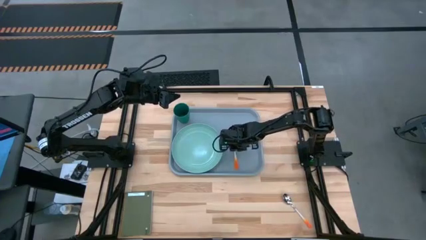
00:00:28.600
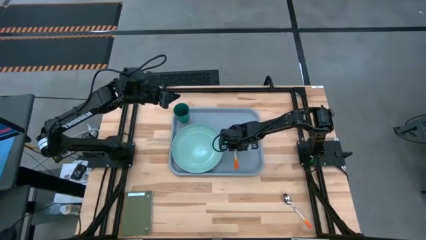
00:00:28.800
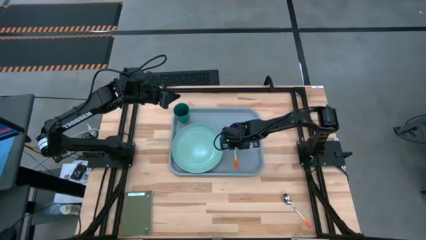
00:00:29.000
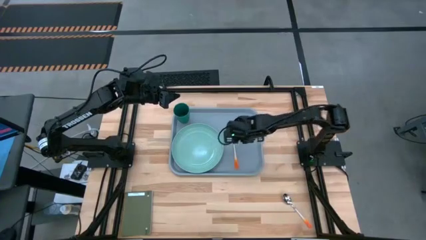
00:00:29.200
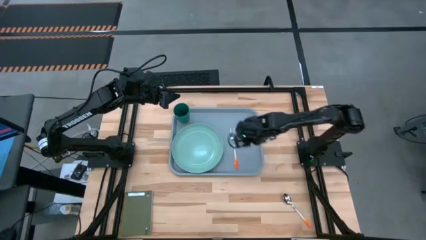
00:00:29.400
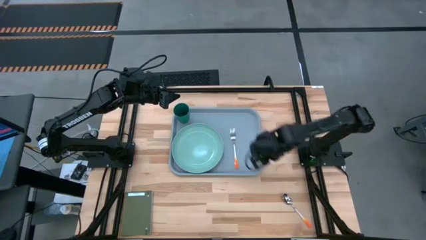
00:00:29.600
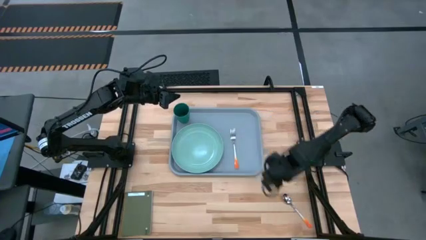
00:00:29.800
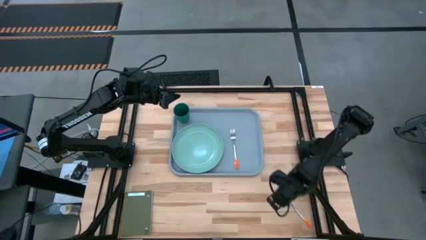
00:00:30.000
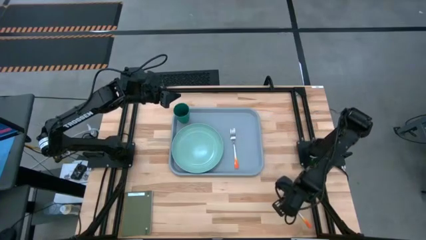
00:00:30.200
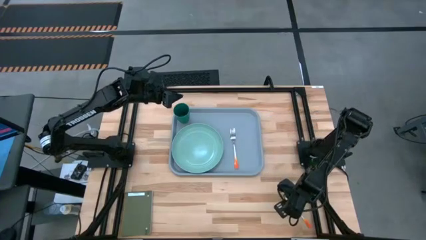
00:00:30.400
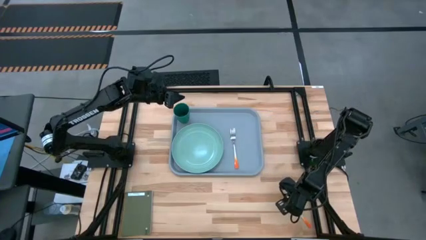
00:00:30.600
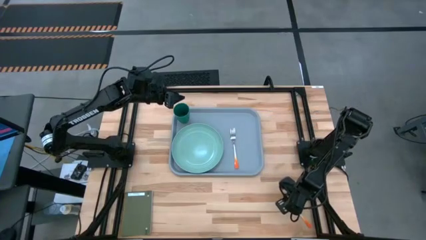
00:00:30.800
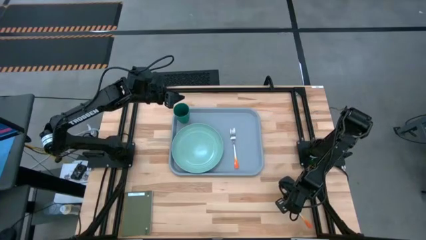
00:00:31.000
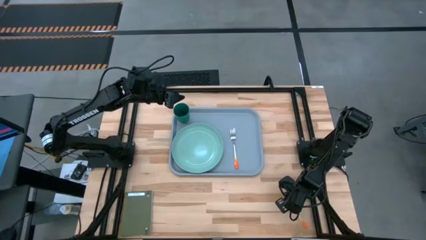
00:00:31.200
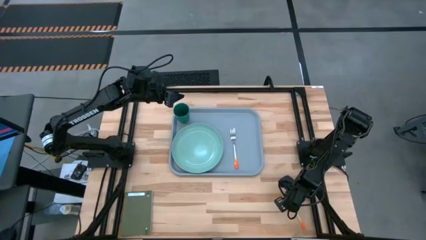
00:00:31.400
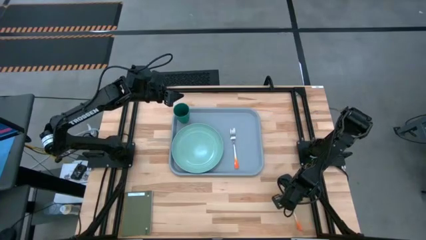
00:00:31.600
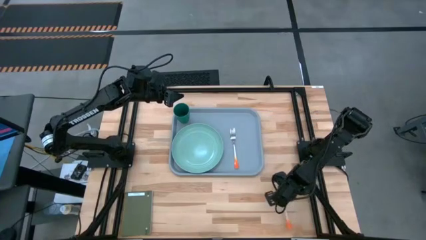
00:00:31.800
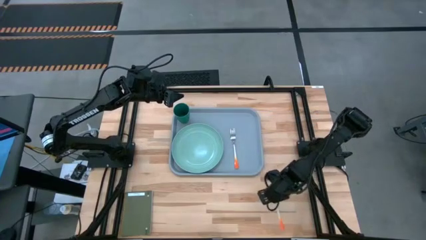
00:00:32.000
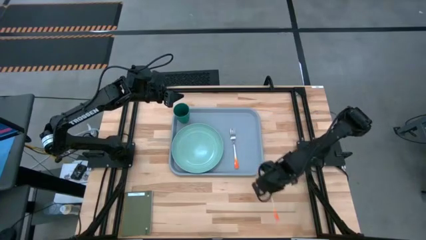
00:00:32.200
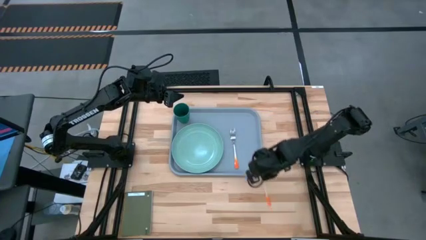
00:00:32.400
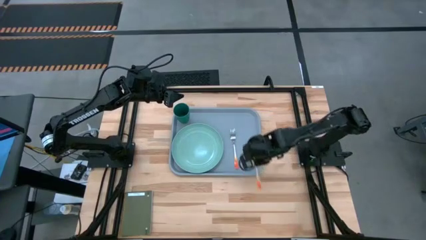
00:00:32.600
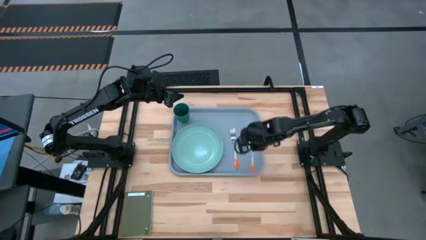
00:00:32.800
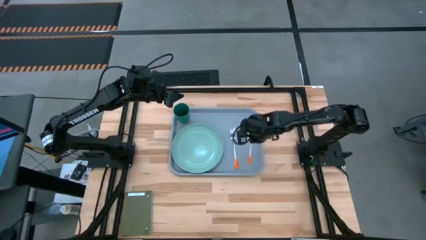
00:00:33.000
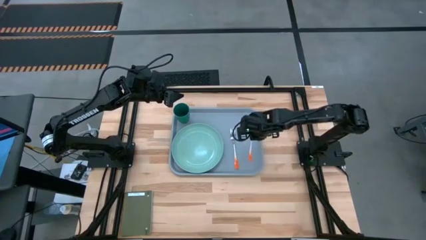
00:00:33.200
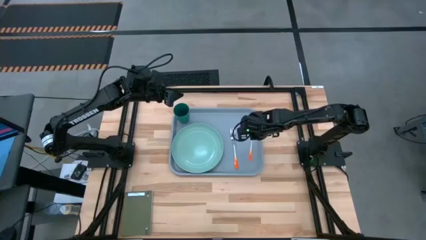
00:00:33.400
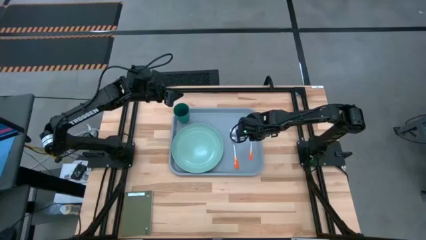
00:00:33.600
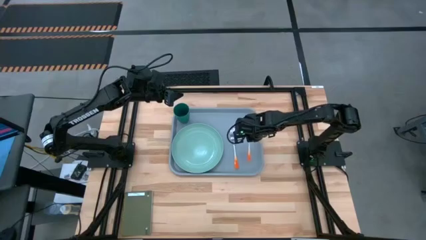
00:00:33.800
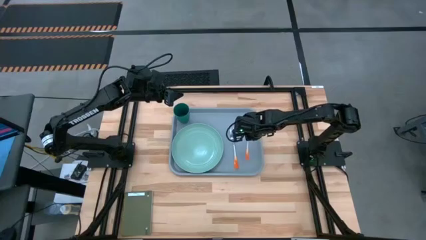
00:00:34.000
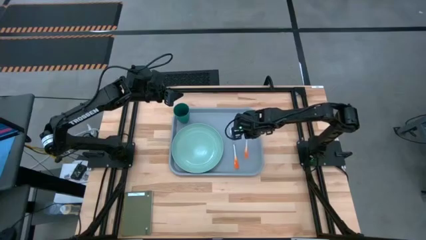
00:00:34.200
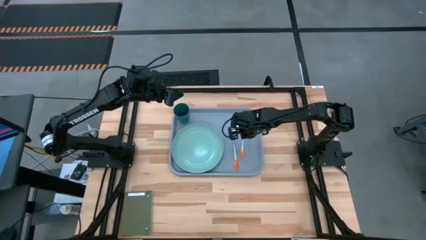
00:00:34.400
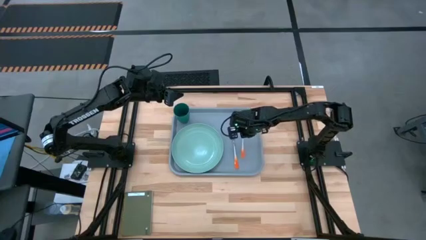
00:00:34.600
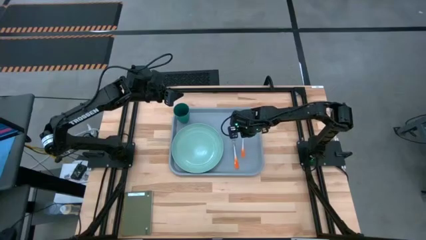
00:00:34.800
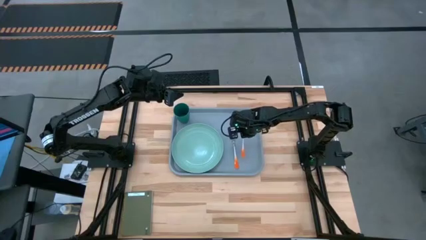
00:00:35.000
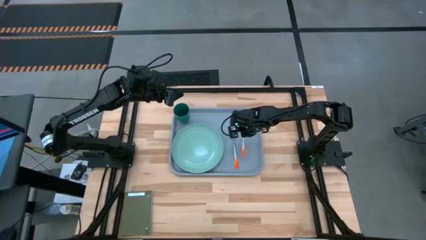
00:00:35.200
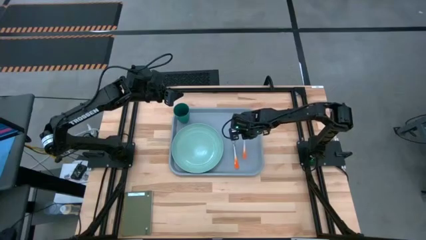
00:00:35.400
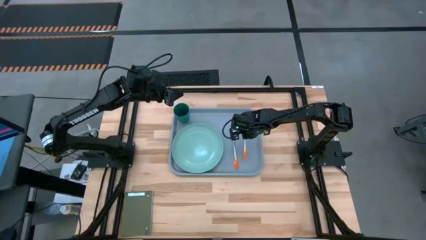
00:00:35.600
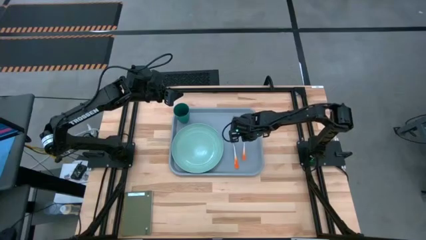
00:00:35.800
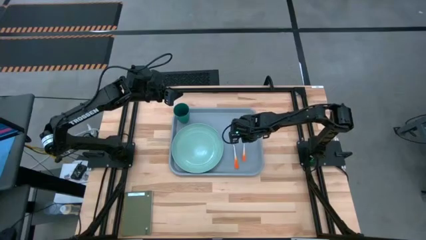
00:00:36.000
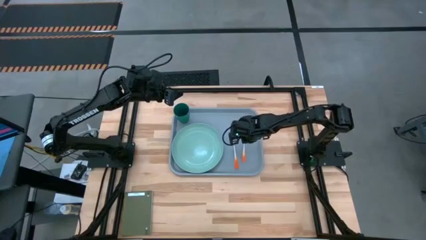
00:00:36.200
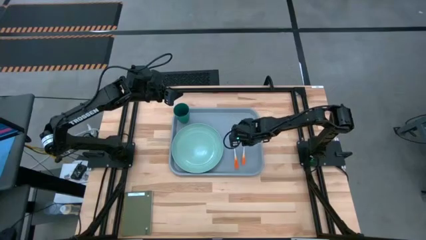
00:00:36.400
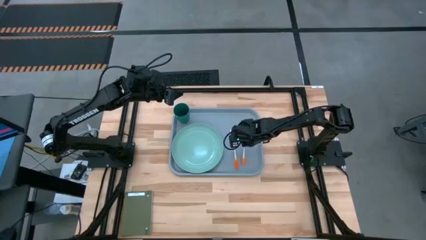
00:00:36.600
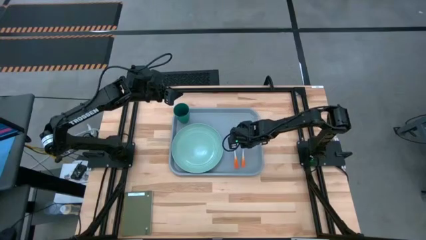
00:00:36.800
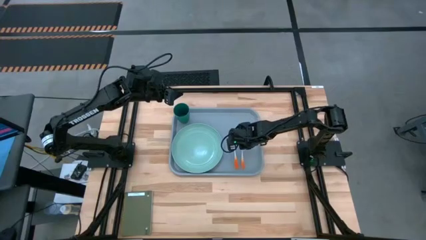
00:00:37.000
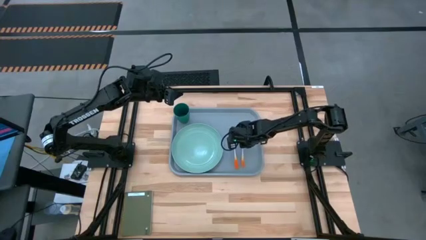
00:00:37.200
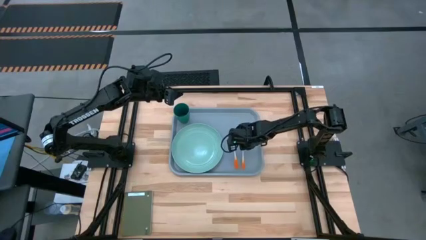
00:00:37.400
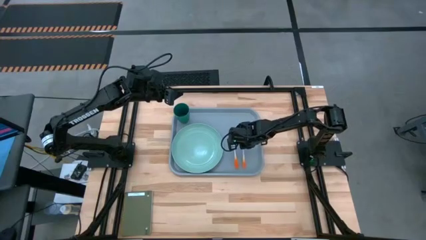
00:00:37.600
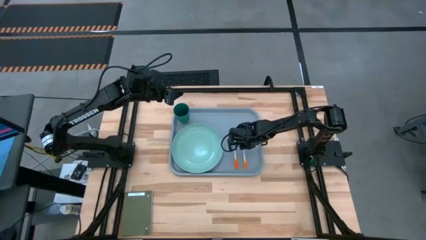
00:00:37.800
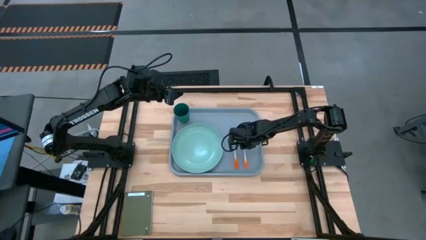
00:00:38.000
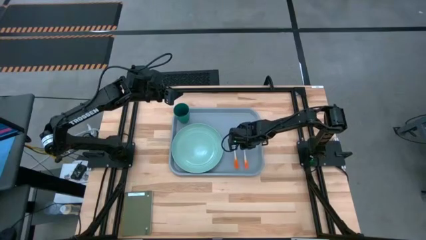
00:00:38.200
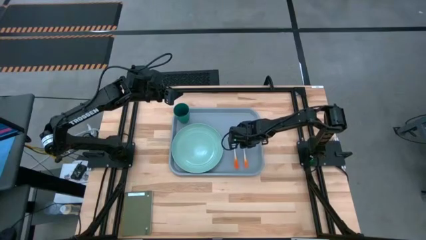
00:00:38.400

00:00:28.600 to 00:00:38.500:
Task: Pick and place plate/cup/fork/spoon on tray
Put the orange spoon on the gray tray to the right of the orange fork

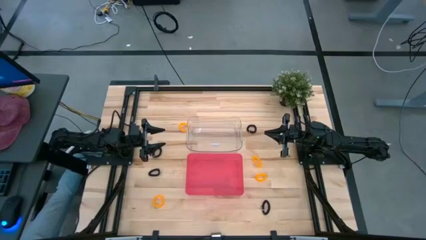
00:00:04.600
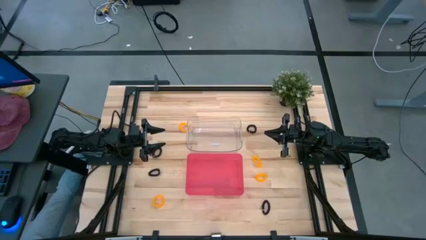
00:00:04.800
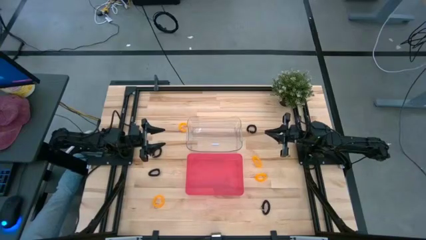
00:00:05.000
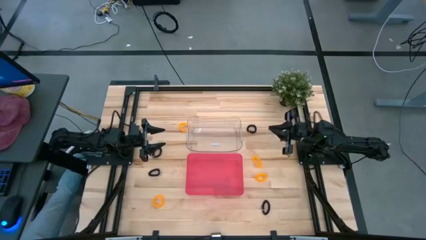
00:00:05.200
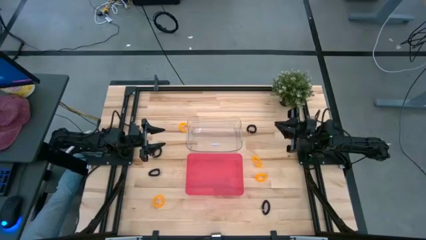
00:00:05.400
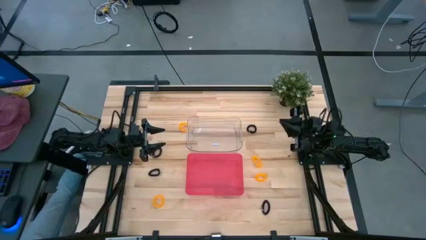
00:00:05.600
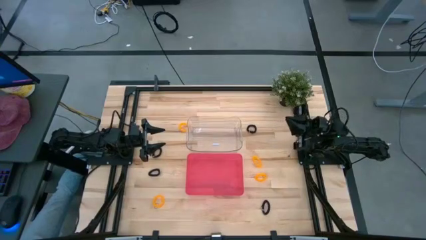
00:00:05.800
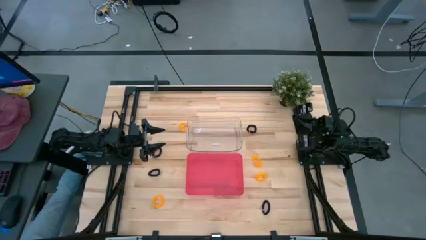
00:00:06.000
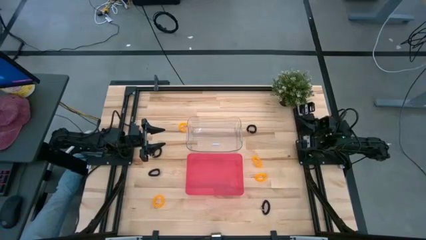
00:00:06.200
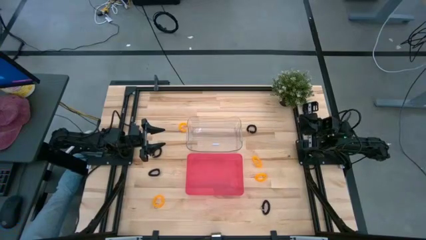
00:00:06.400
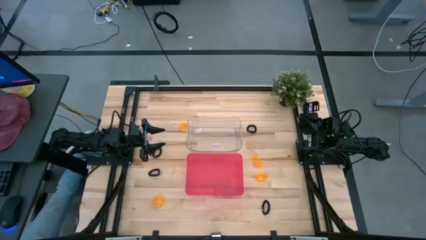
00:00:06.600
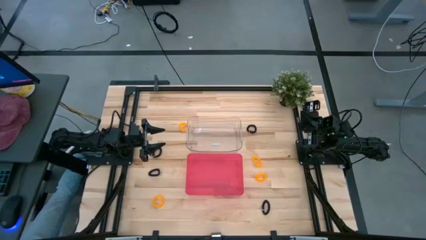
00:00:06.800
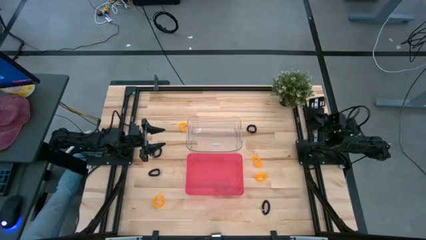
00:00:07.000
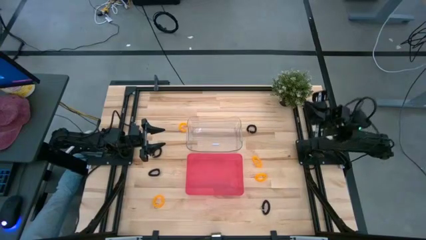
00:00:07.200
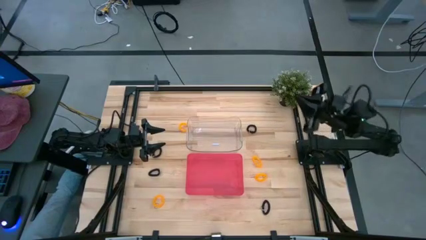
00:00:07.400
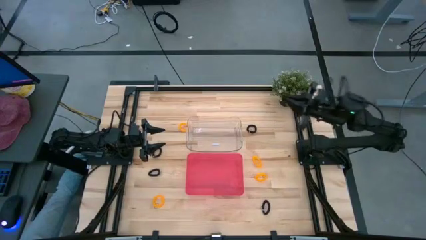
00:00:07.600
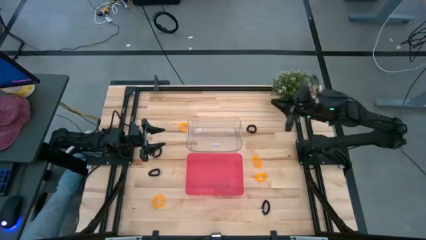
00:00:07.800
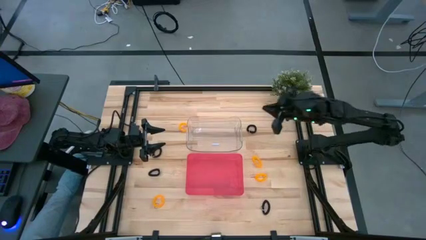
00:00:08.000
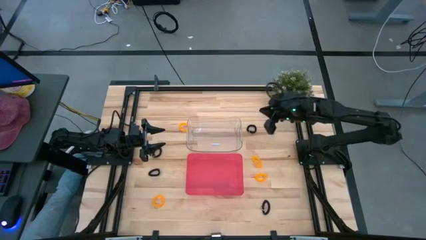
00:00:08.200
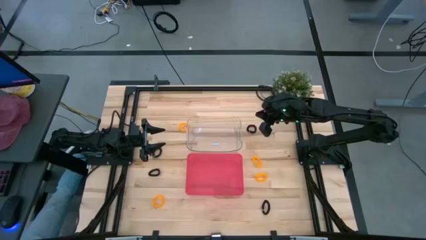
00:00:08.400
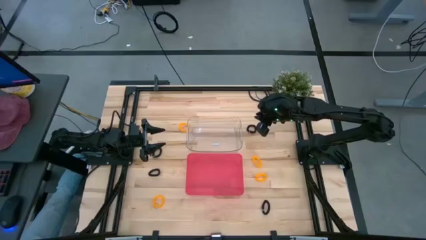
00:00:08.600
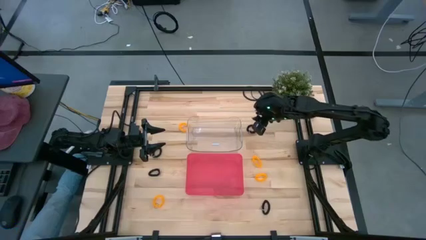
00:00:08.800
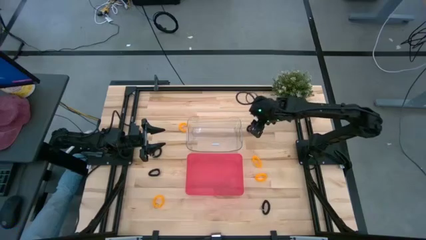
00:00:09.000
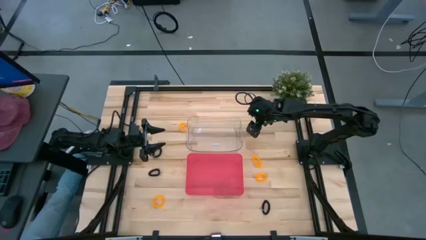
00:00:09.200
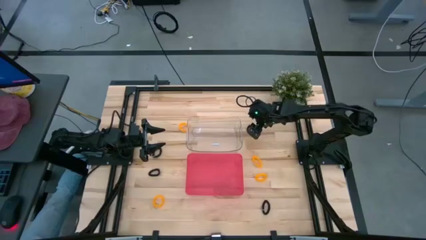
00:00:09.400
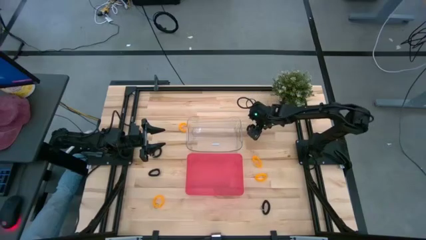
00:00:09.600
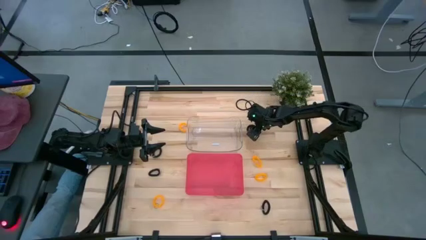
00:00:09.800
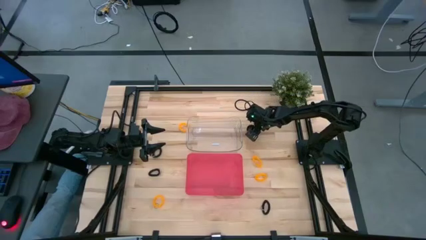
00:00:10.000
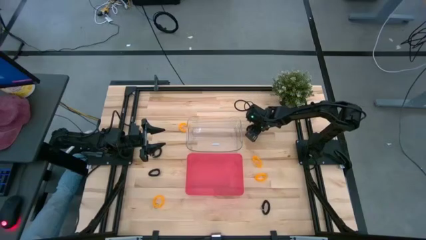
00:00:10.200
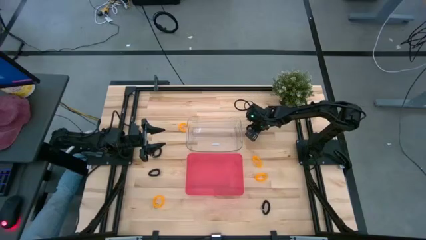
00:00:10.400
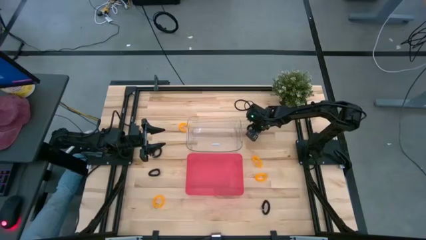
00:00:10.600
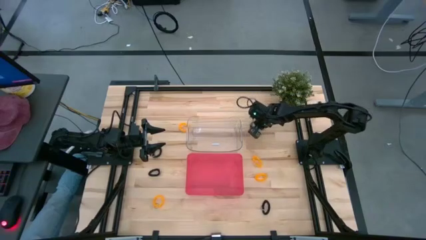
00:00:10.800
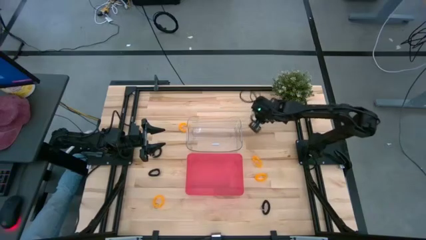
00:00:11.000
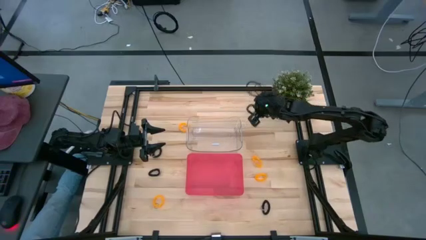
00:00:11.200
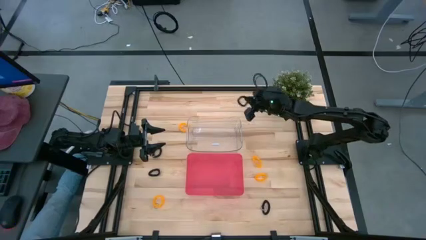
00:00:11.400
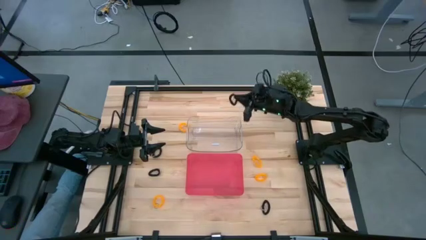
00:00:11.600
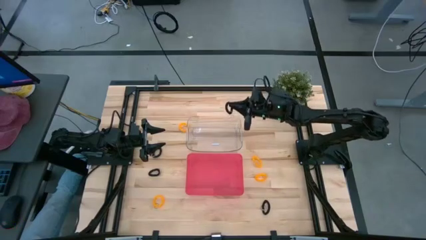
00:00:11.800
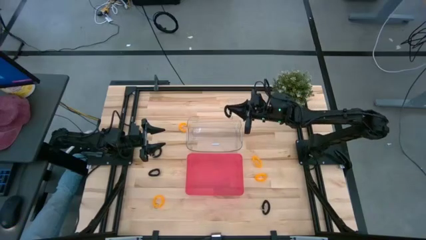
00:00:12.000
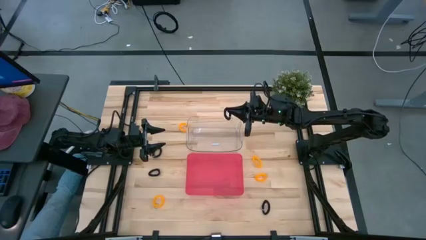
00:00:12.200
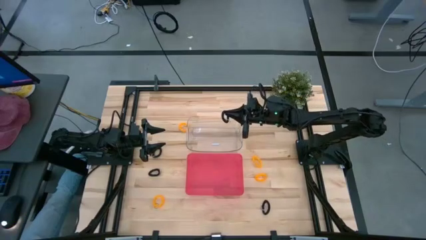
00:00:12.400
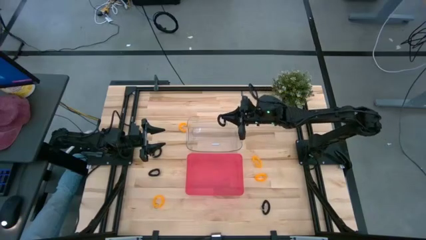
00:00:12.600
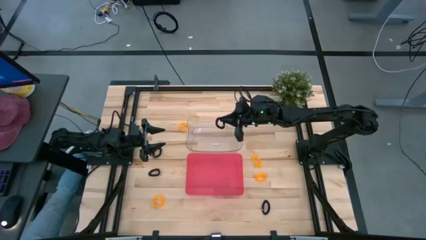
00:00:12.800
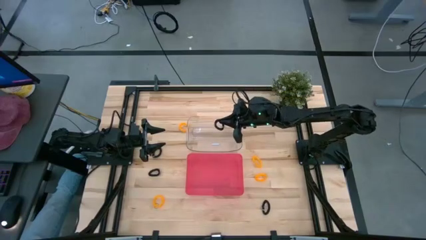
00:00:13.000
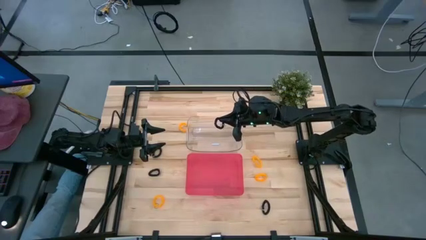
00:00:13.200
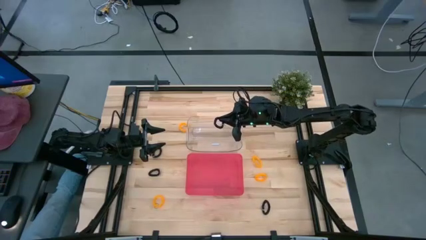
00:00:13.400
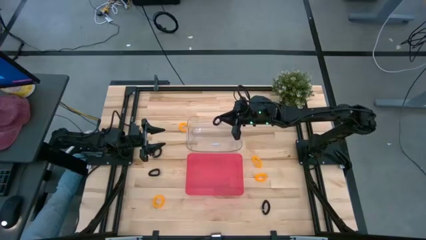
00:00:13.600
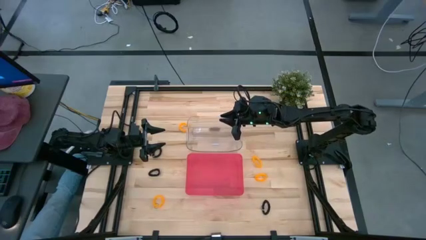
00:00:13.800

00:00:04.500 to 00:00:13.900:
Task: Sort spring keychains
Put the black spring keychain into the transparent bin
